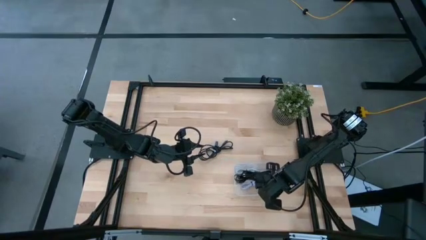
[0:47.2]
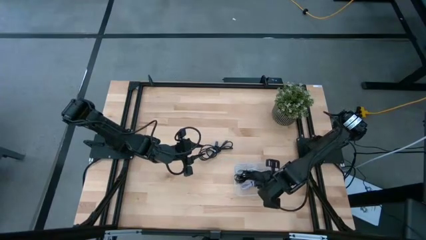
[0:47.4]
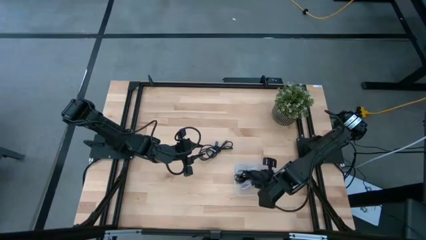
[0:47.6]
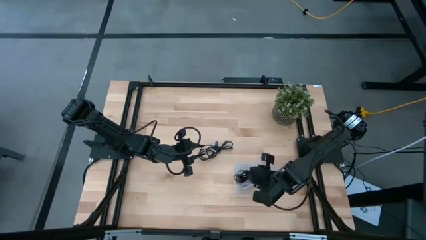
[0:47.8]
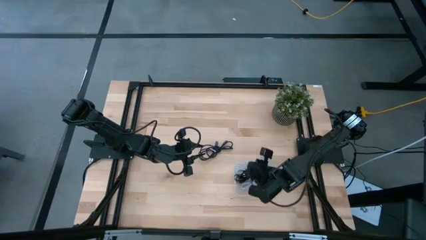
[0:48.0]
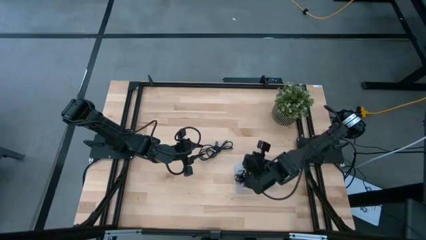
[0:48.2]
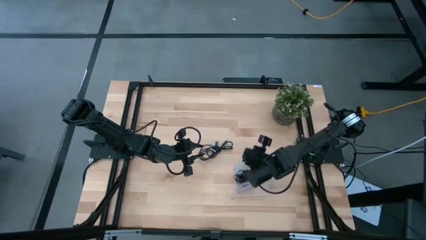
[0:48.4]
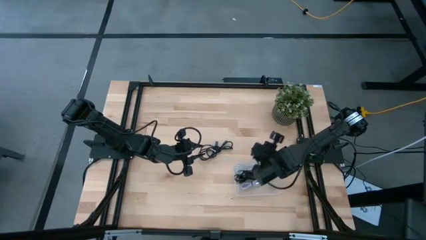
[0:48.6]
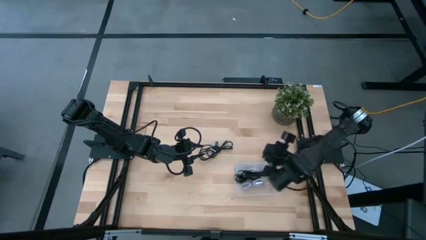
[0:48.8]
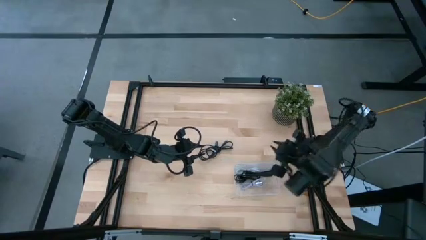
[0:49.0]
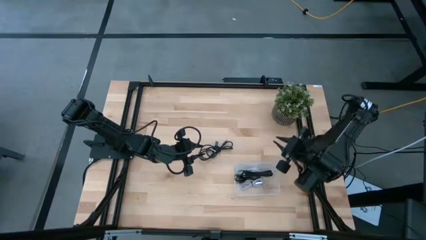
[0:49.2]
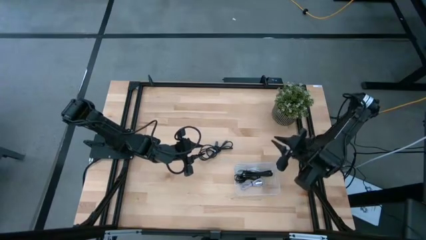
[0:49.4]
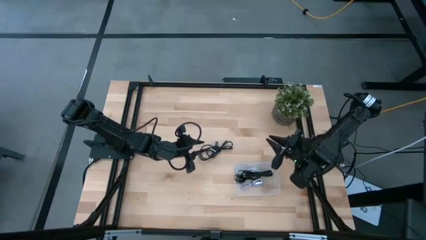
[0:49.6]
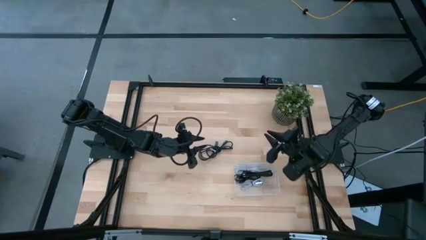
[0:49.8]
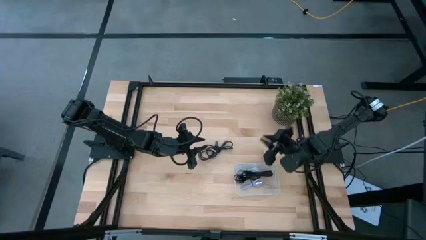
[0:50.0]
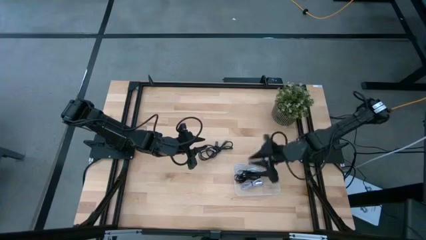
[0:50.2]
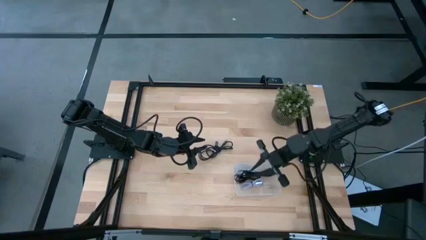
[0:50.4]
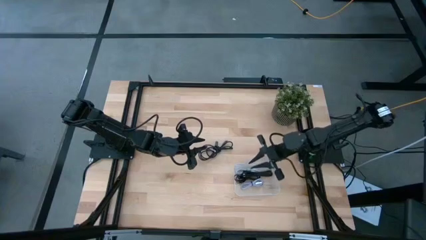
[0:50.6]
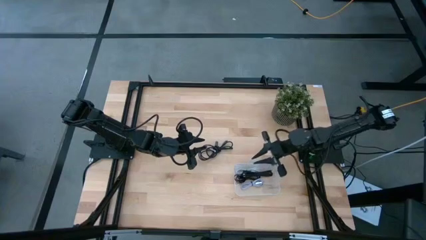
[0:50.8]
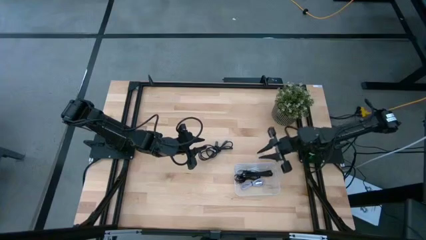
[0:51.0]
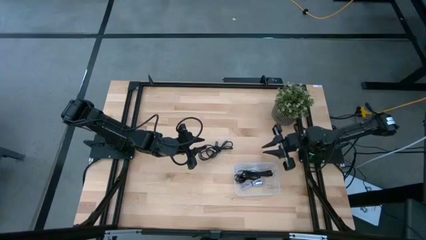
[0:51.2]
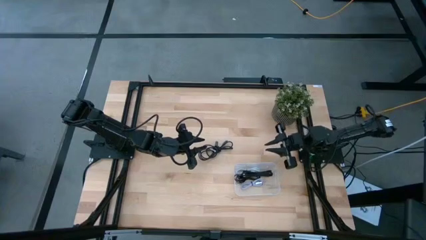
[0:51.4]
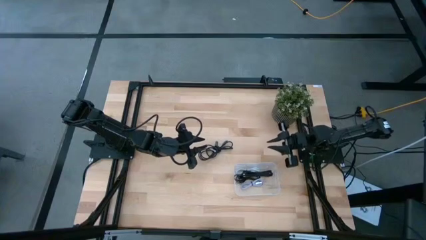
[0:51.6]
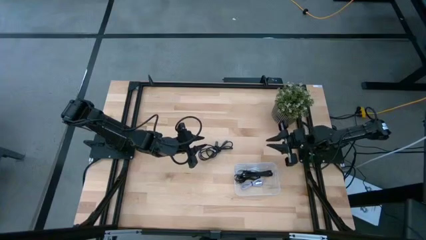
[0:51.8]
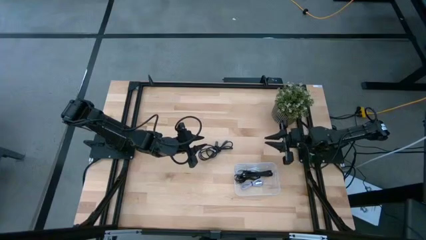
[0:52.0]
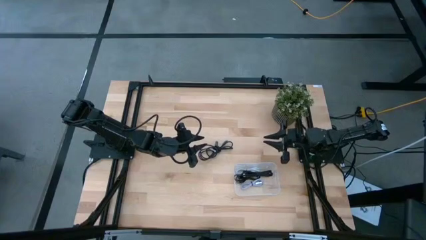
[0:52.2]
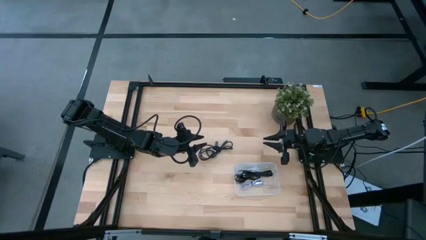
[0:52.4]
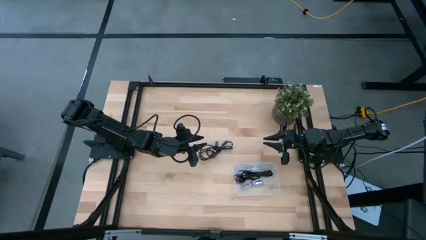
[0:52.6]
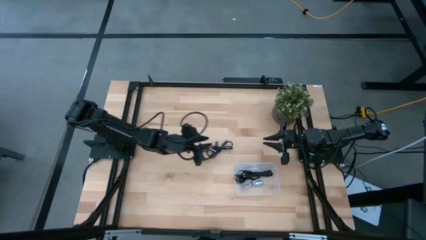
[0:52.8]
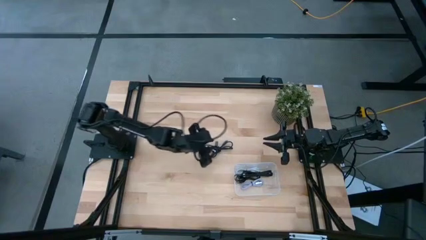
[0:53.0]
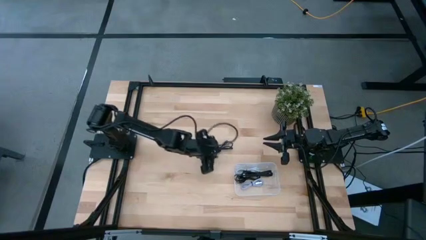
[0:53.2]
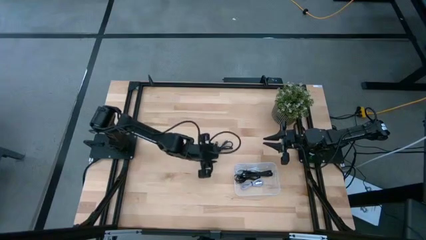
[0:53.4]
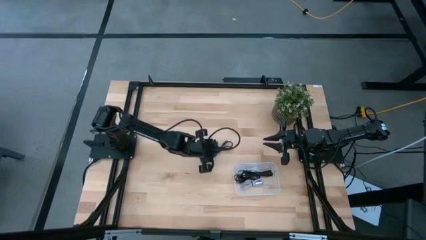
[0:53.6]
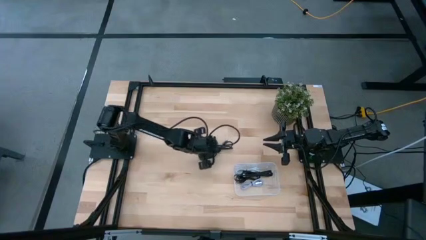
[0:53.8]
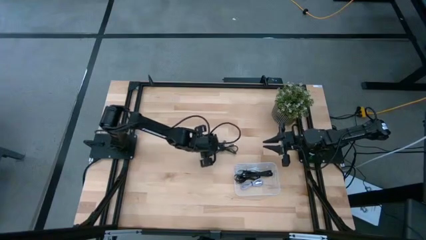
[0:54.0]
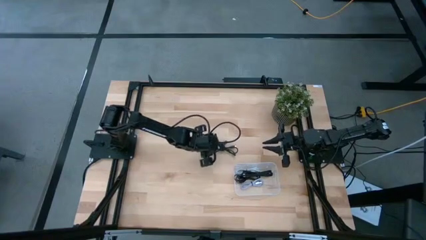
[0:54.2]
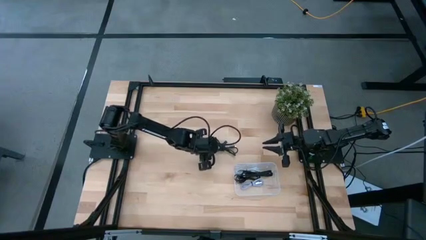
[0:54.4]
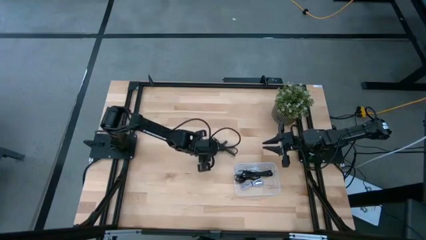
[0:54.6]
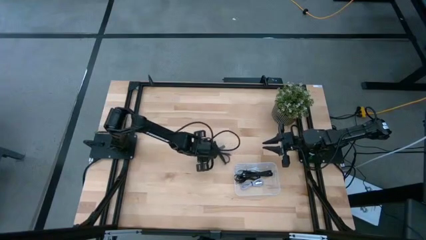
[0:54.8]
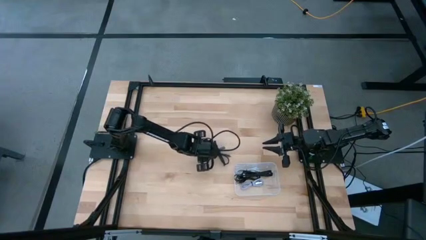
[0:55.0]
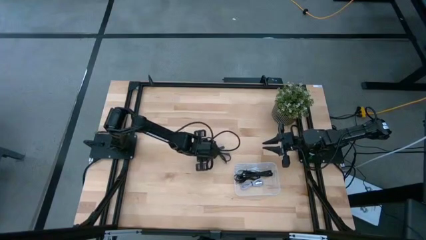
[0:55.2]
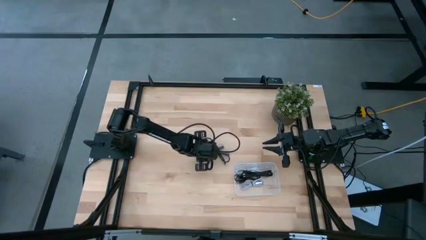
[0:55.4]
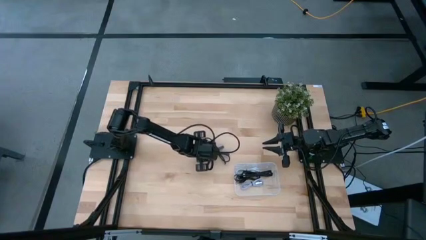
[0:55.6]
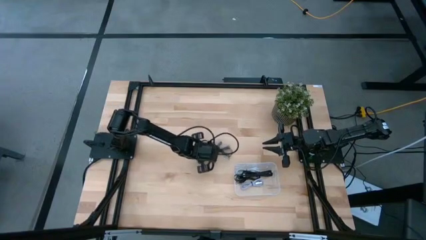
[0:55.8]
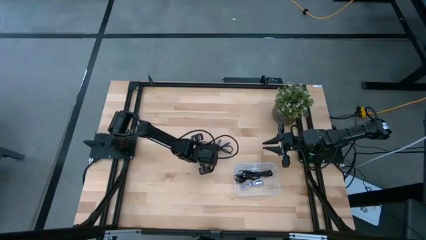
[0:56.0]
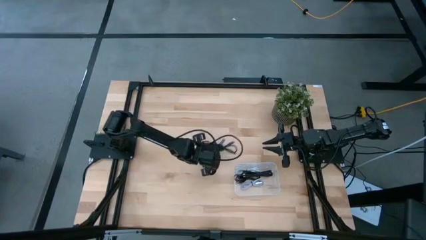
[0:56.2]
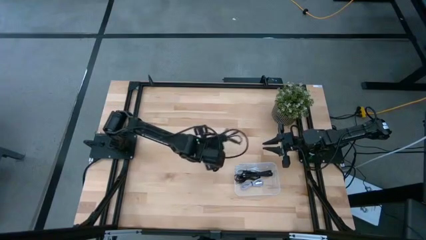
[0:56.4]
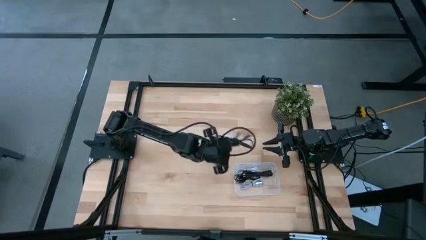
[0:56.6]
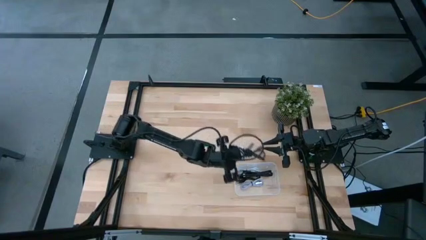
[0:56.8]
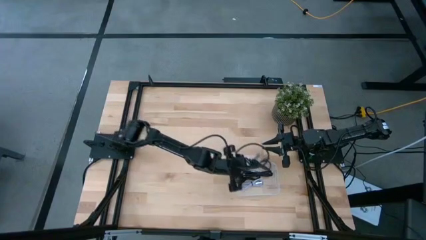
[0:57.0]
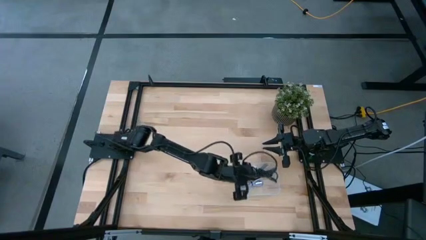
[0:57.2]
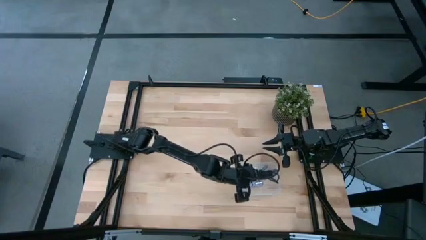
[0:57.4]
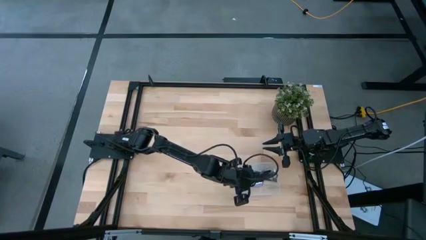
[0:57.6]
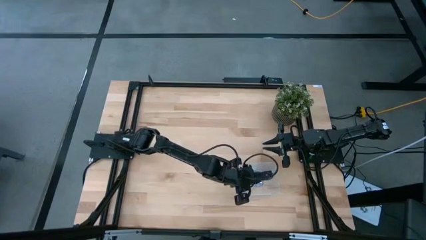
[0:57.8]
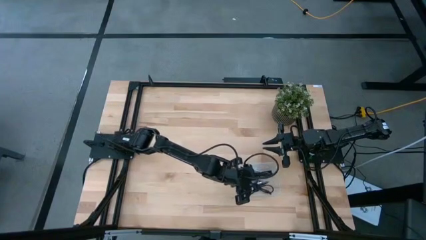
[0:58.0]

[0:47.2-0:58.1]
Task: Pick and place USB-C Cables
Put the black charger cable into the transparent bin

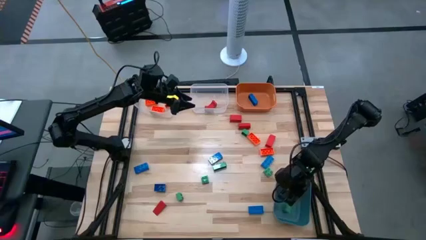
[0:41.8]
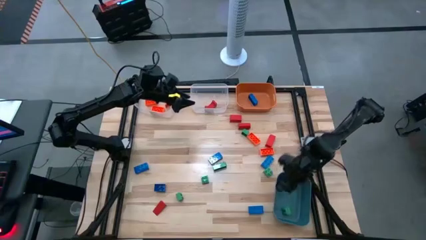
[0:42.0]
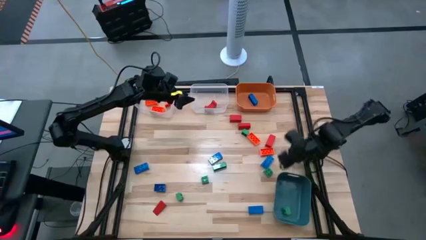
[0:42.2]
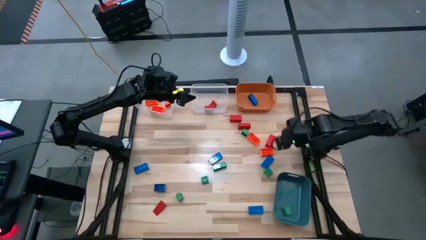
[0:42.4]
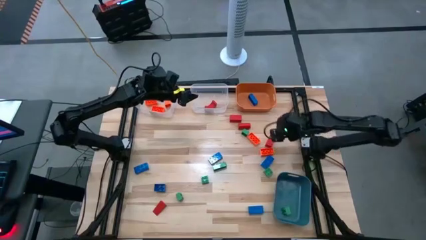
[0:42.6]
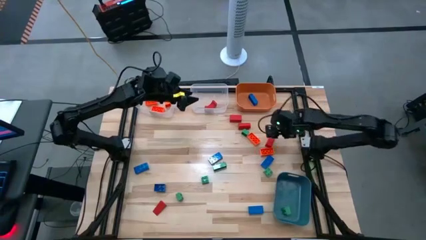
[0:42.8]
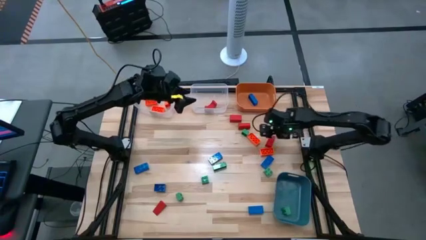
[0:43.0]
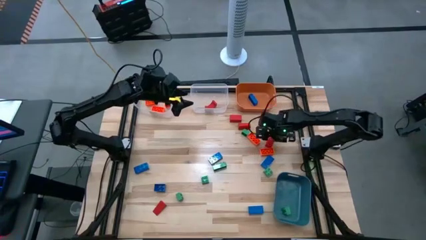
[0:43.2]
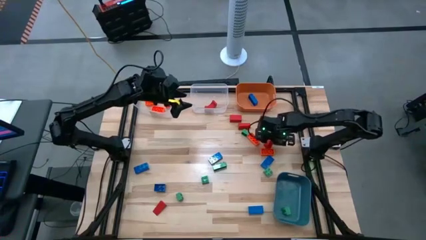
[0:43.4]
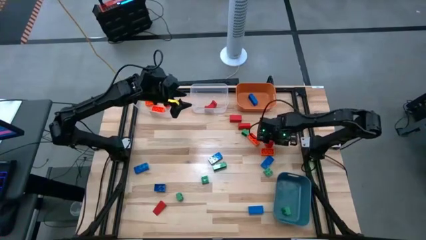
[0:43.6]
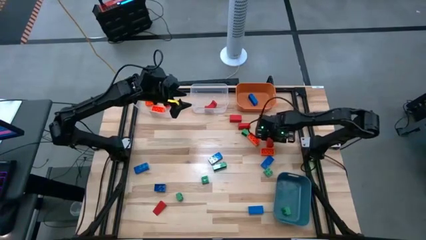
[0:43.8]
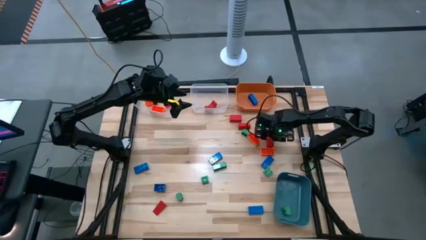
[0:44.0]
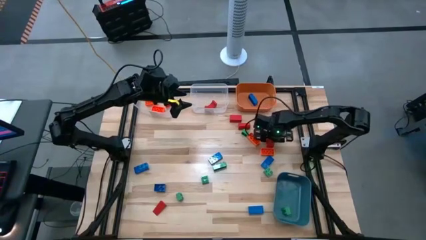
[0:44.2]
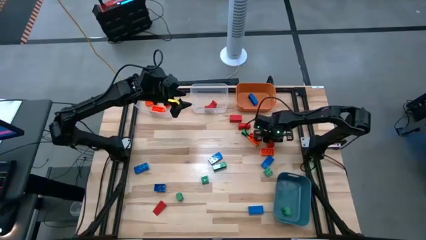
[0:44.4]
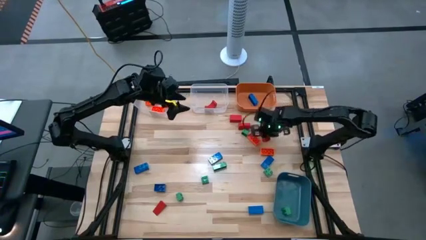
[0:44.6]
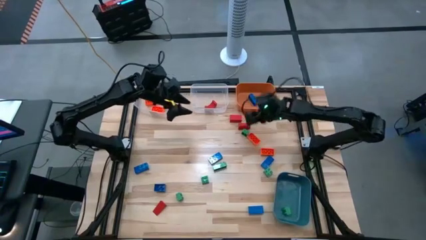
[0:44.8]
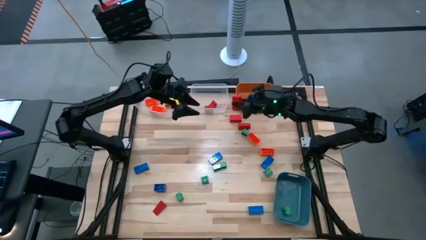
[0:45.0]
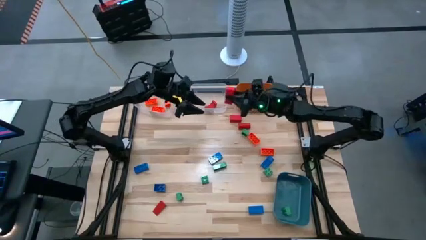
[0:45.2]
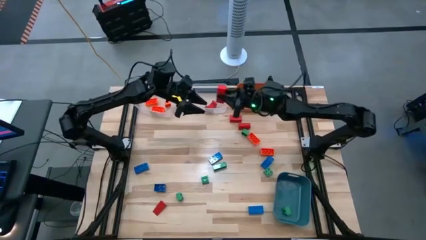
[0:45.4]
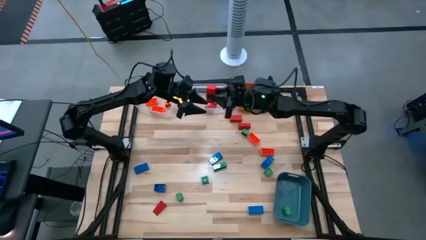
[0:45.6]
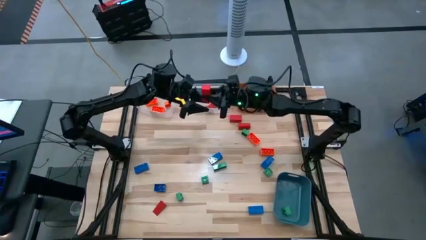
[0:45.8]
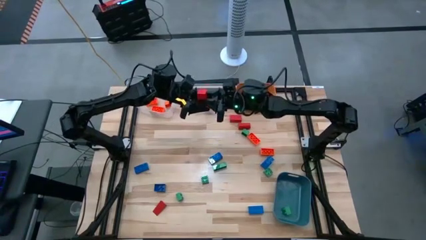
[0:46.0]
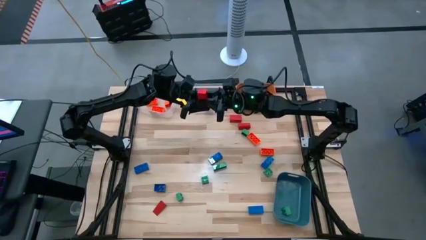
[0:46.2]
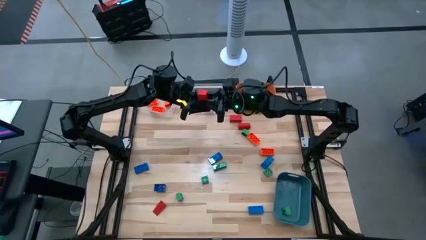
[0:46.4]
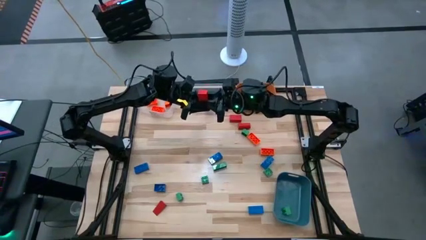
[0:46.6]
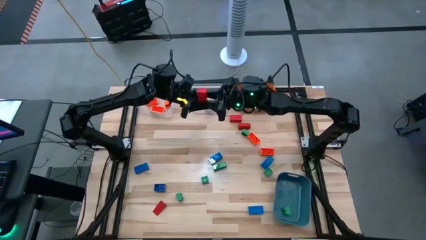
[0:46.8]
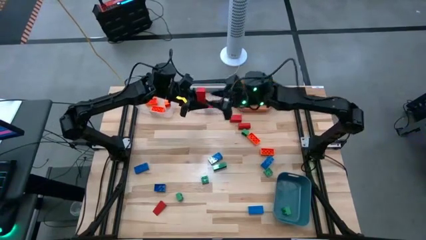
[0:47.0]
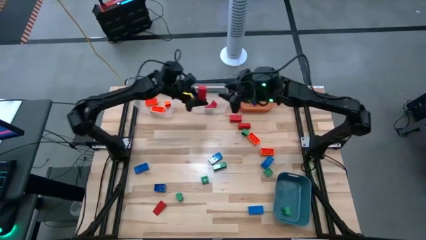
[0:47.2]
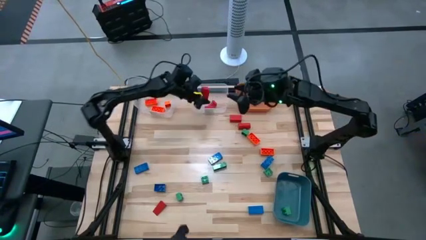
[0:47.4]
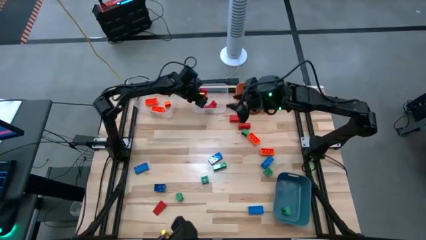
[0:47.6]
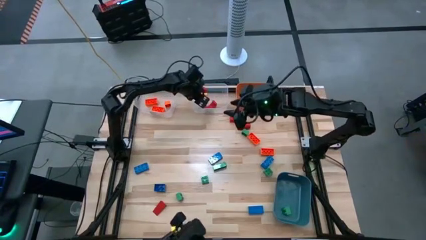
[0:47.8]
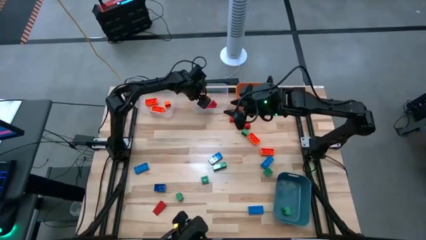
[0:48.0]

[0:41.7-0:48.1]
Task: Sort blocks
Put the red block into the right transparent bin
